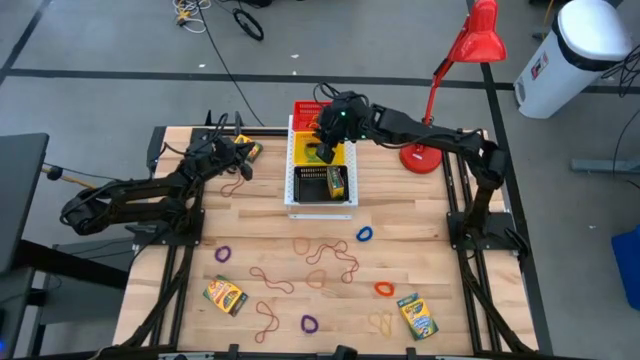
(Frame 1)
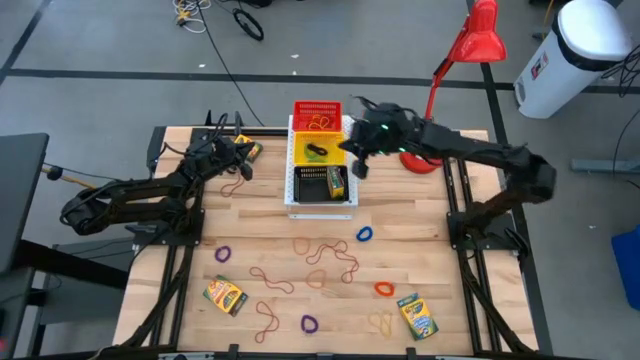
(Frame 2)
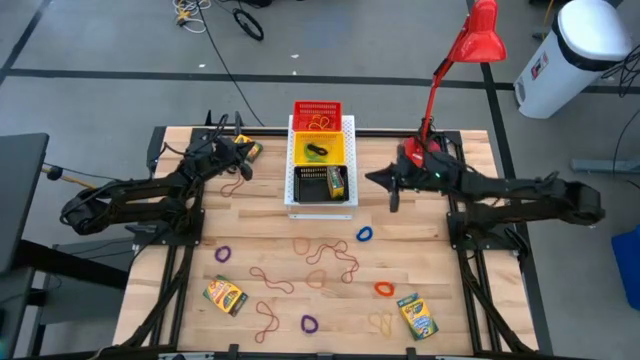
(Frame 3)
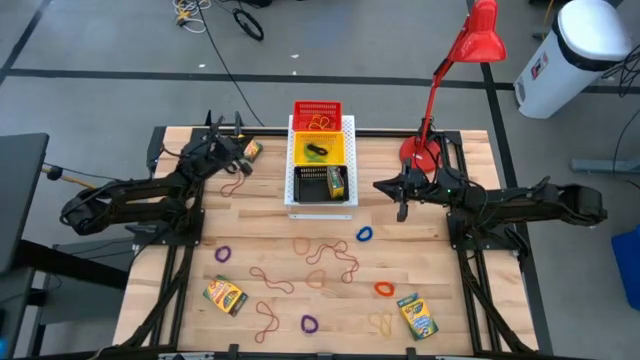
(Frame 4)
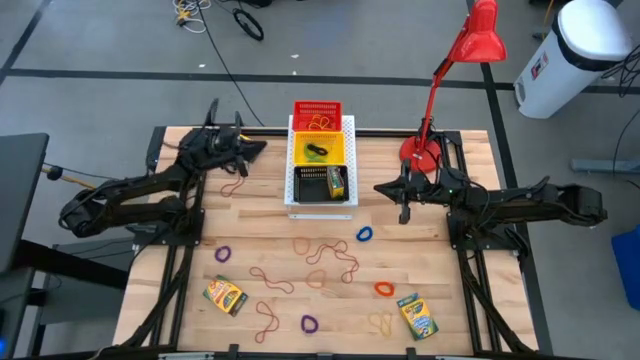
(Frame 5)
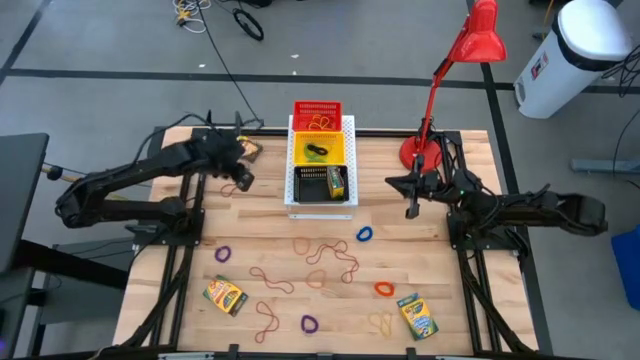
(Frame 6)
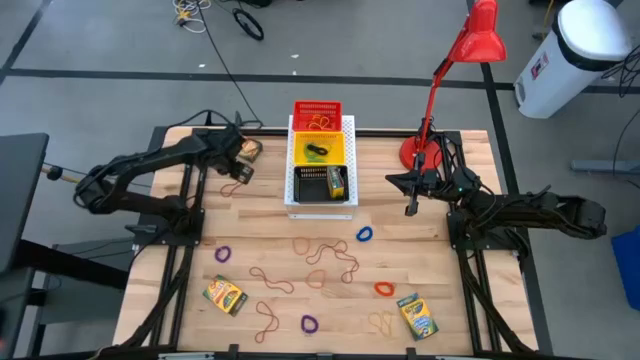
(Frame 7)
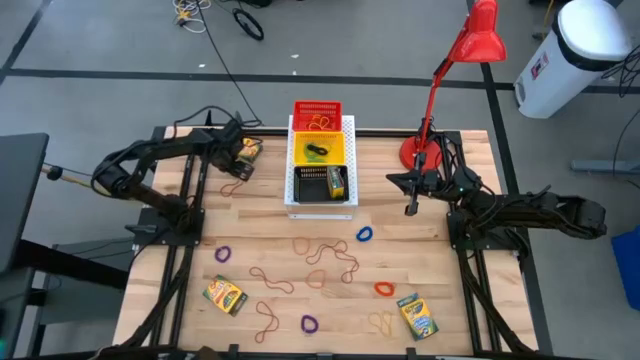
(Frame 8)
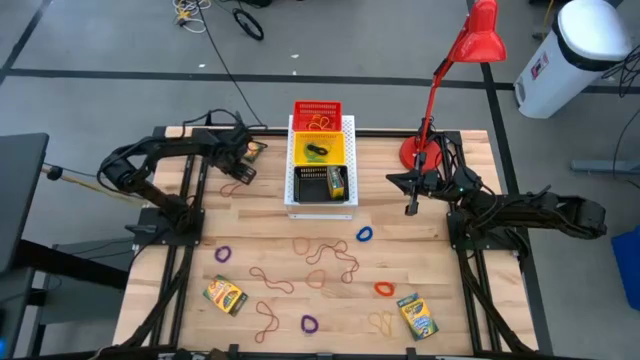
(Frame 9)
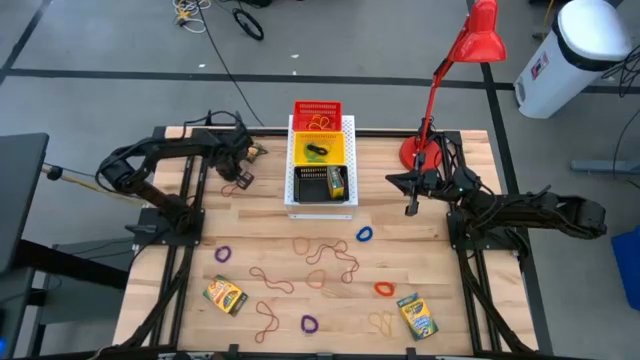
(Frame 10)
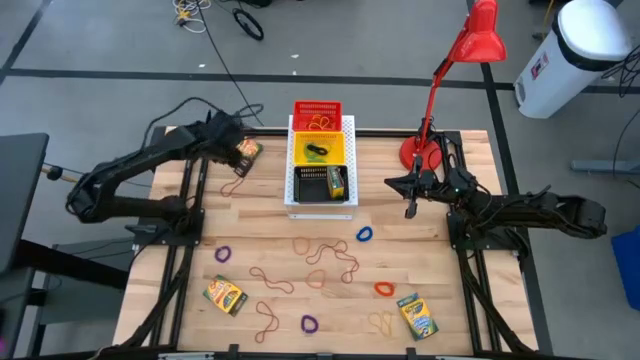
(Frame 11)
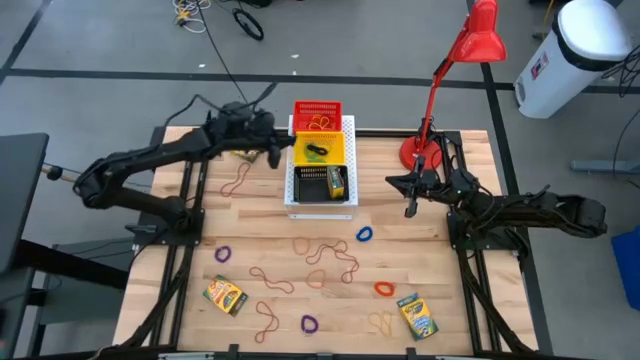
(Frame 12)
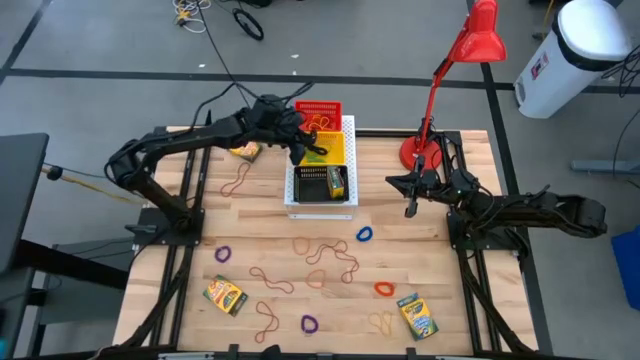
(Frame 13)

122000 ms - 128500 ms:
Task: Pick & Place Office Desk Supplies
Put the black spring keychain into the yellow bin on the shelf

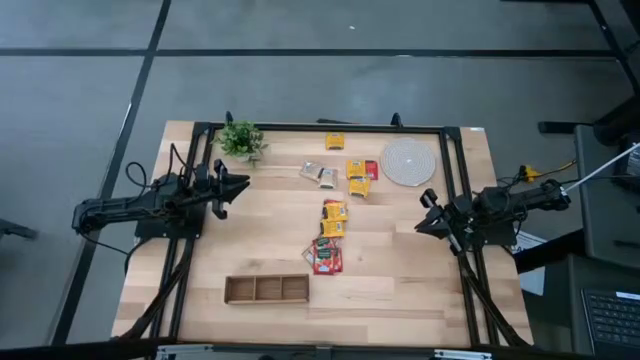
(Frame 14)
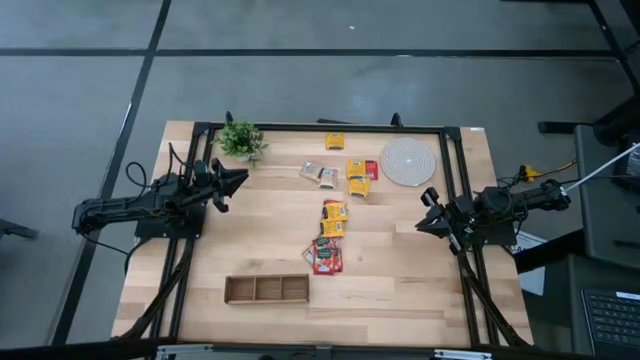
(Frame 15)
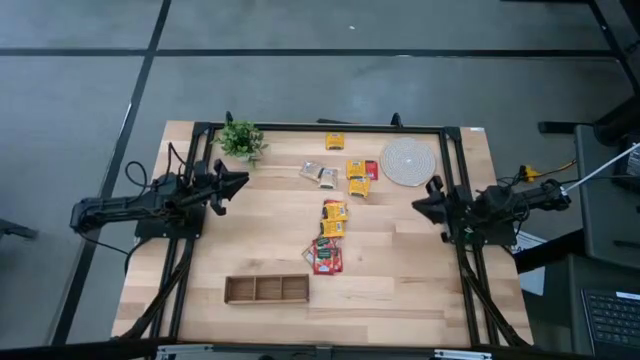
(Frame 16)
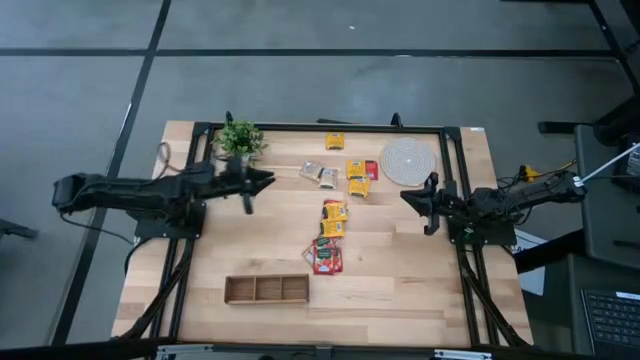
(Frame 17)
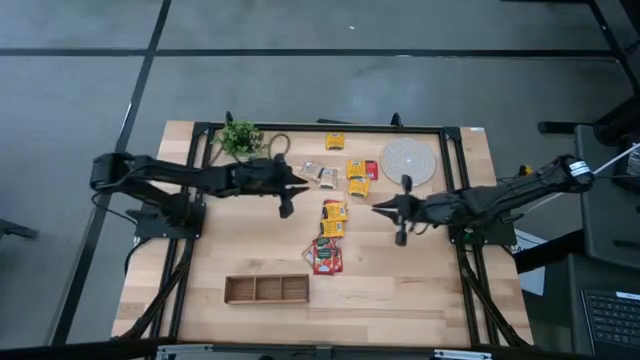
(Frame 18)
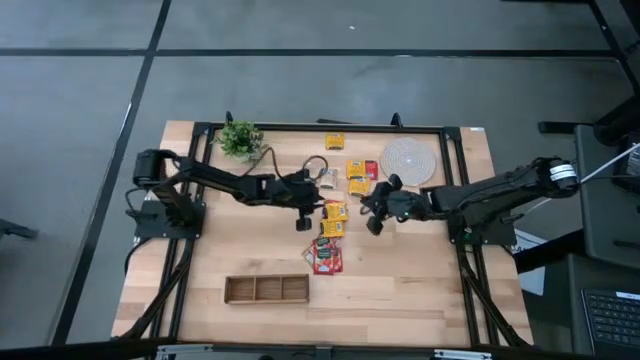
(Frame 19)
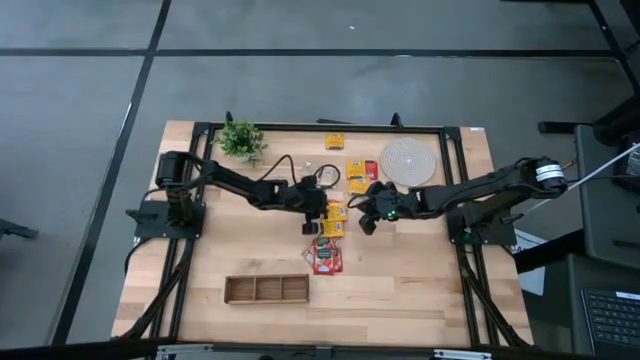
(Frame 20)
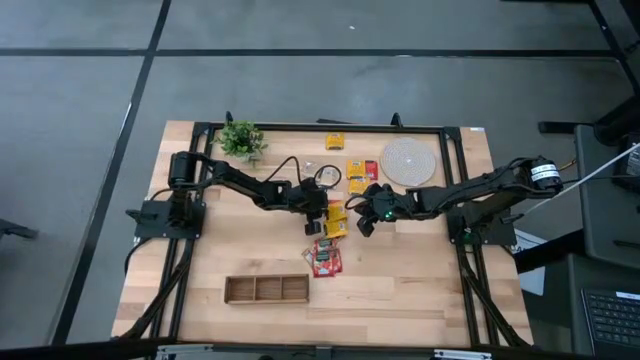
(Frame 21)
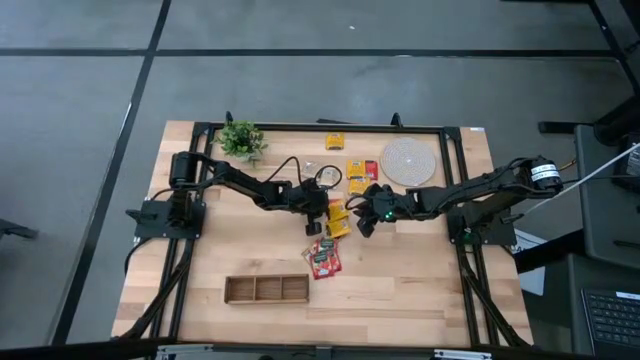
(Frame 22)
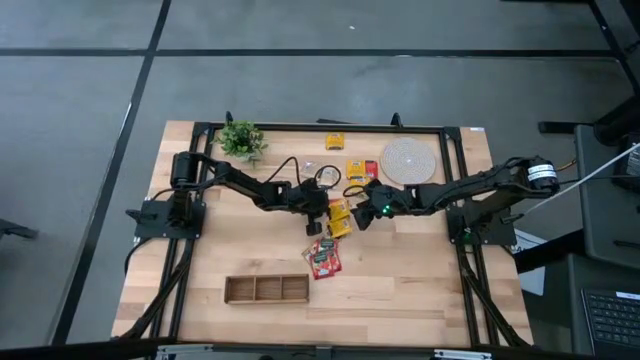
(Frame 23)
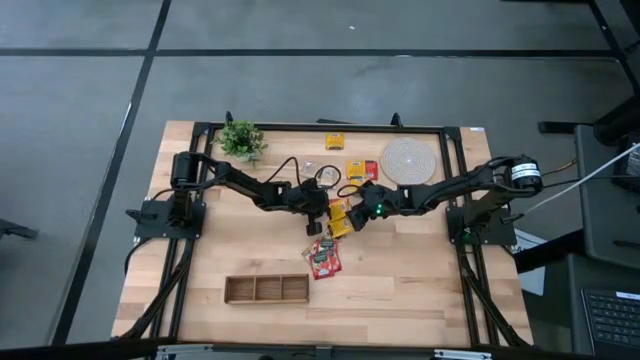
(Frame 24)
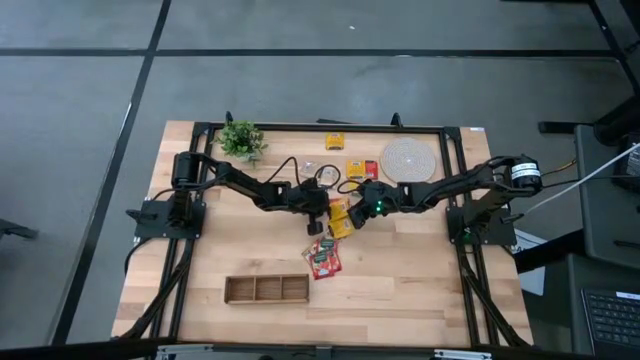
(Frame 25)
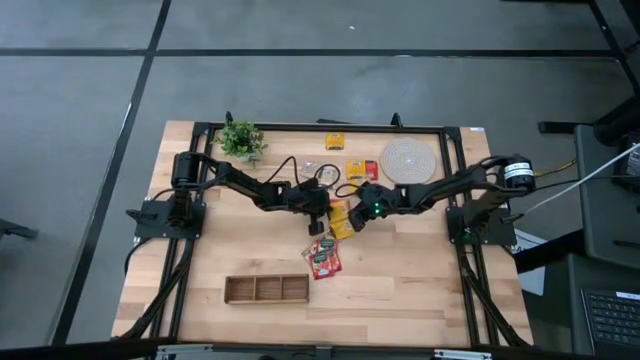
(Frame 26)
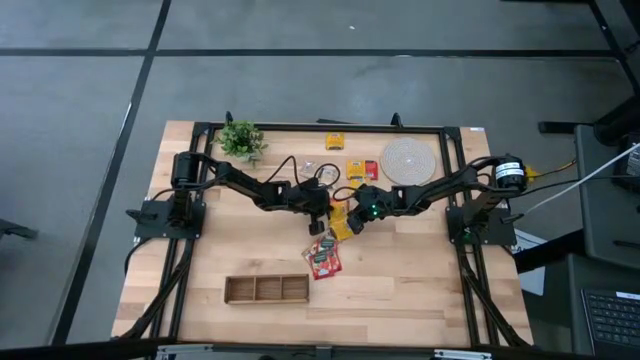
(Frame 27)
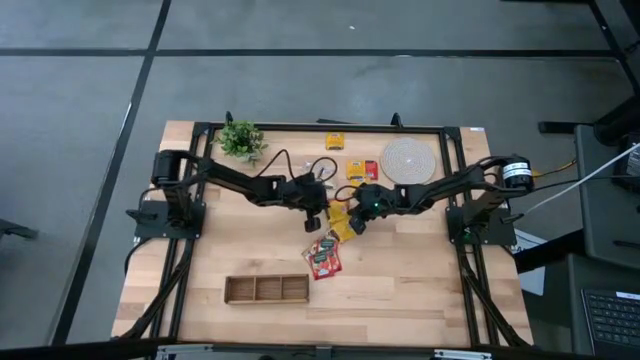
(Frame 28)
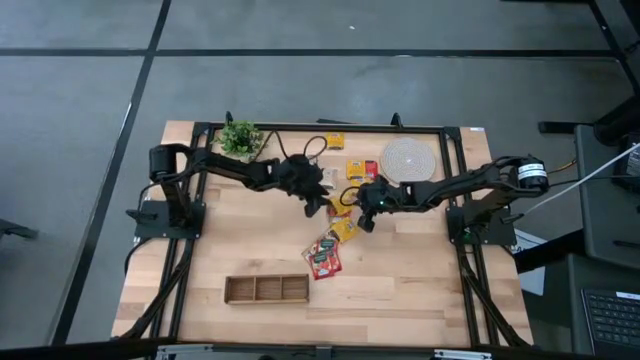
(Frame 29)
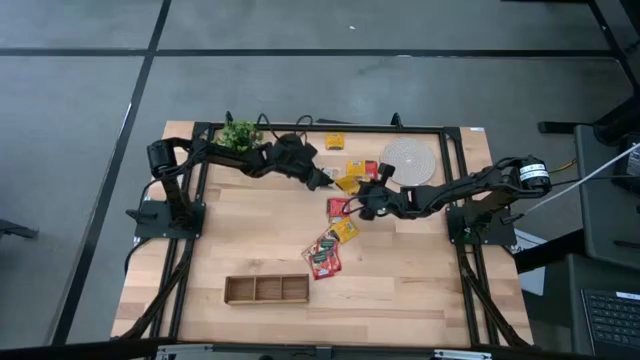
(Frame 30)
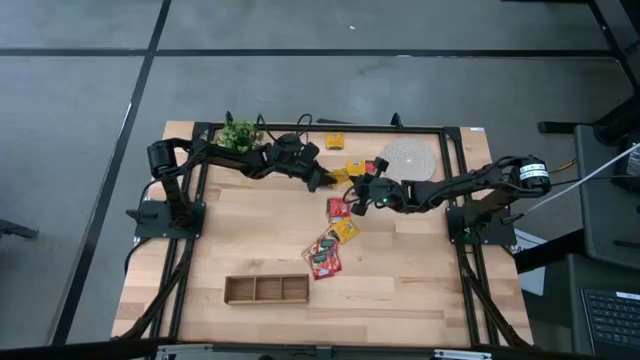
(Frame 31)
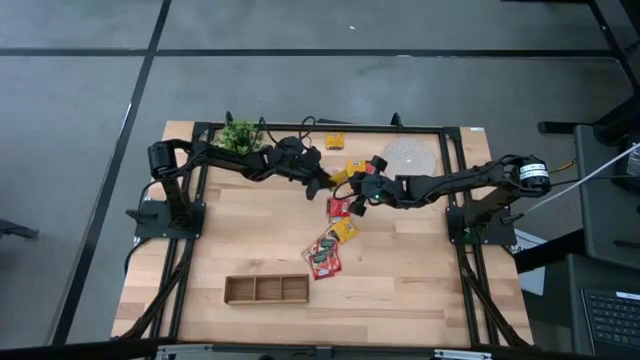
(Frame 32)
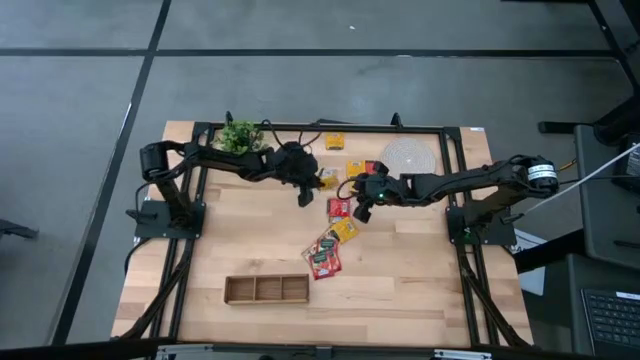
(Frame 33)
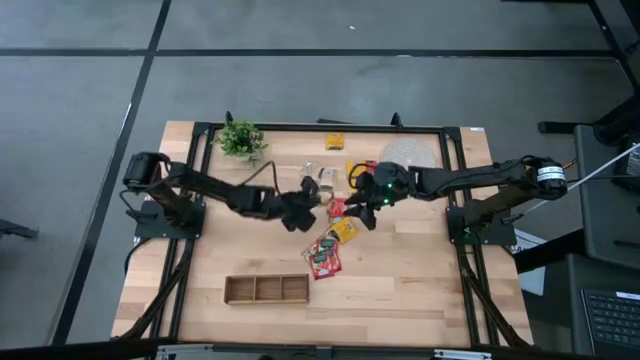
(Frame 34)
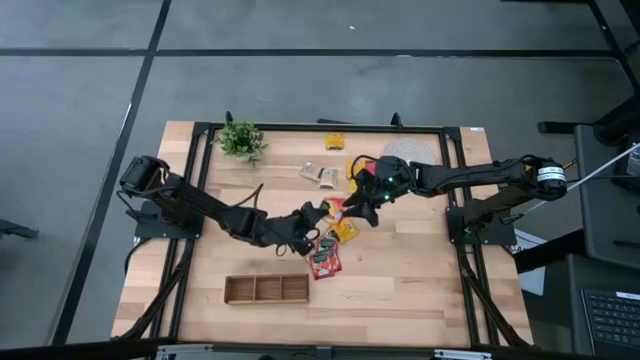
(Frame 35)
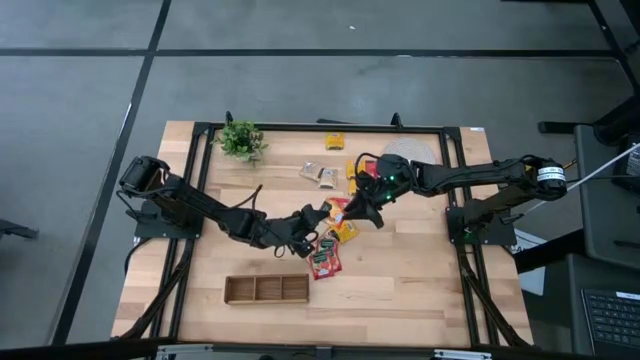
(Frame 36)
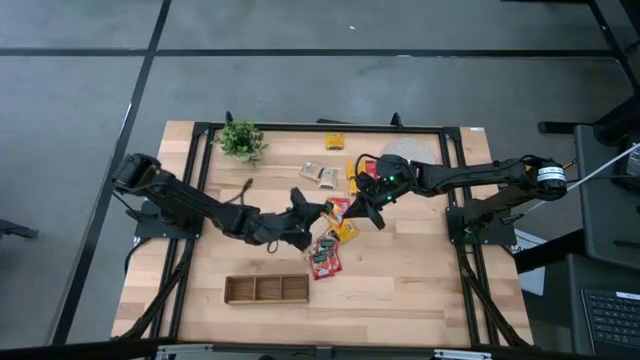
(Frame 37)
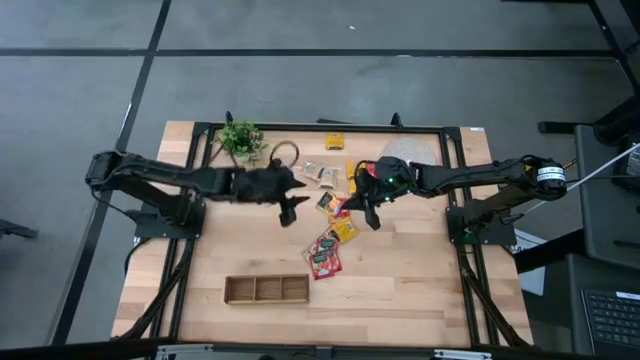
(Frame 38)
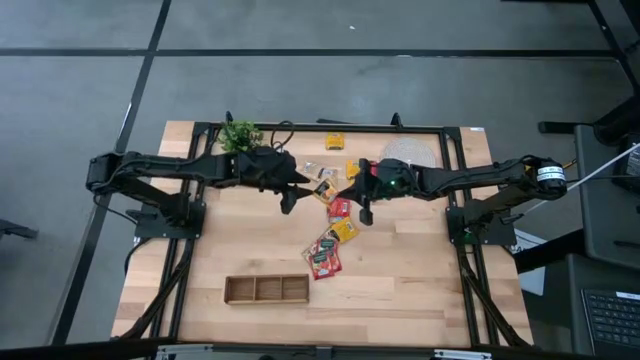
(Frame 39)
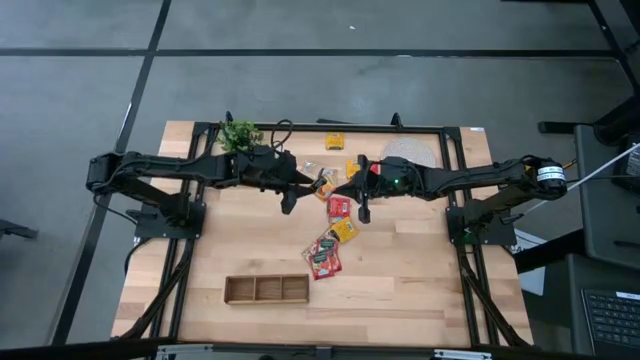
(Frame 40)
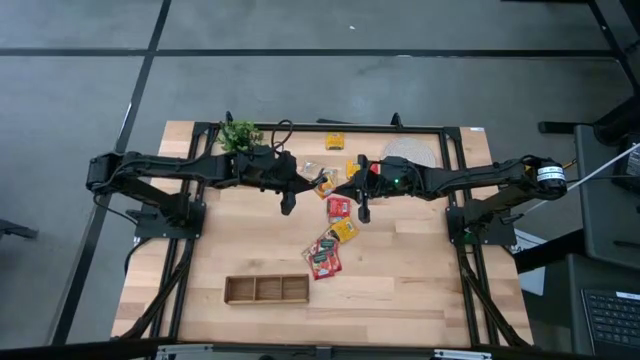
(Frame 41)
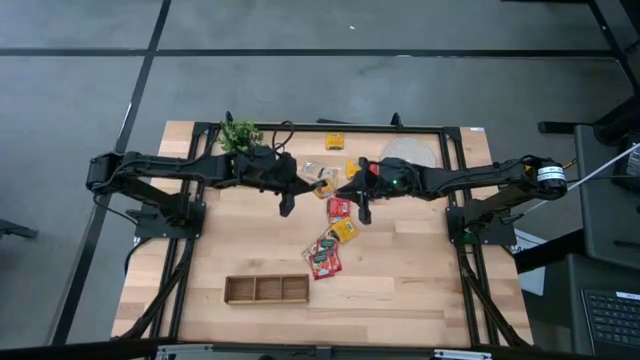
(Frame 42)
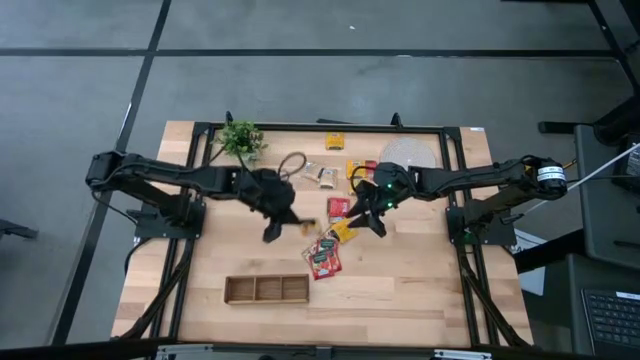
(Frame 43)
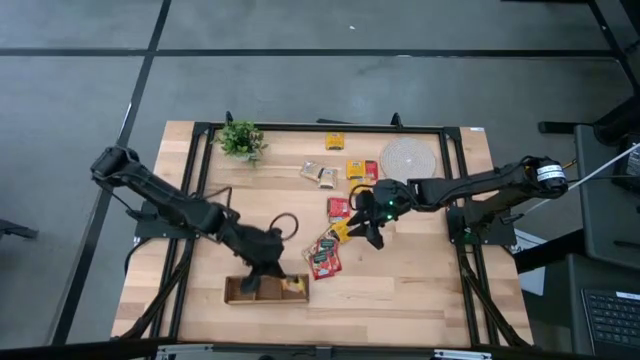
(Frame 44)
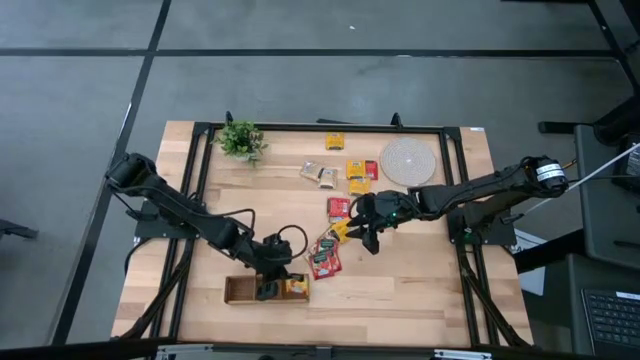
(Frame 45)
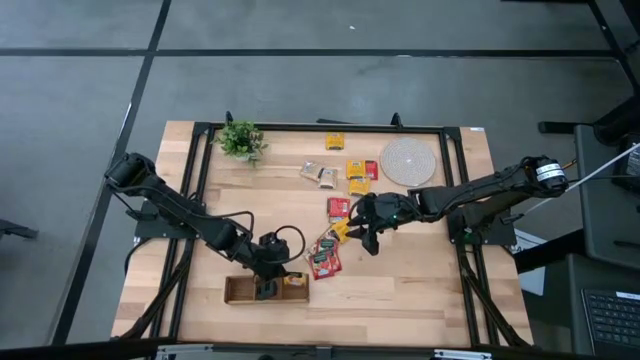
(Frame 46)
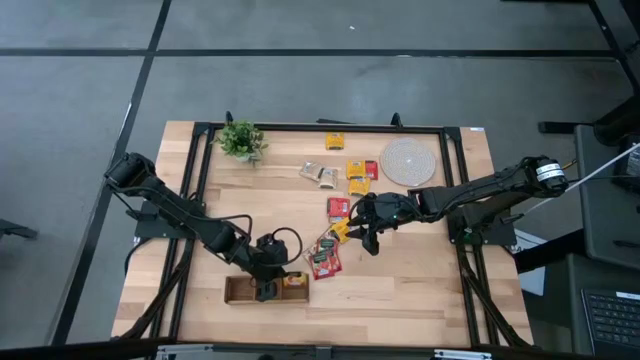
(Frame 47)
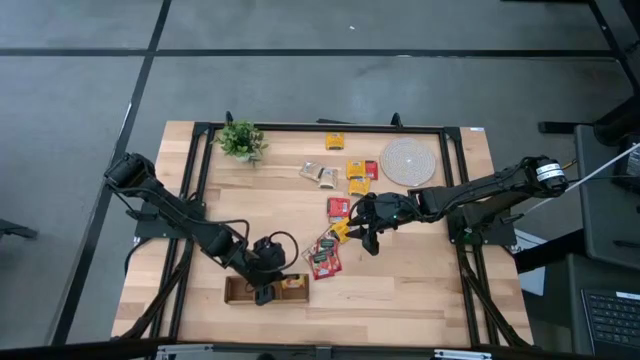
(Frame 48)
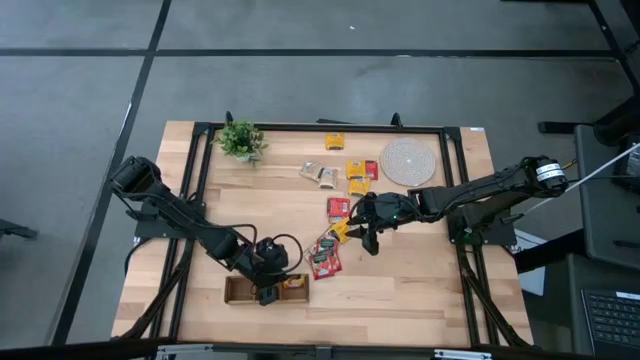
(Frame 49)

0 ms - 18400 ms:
Task: Pick & Place Tea
Put the yellow tea bag into the right section of the wooden organizer
